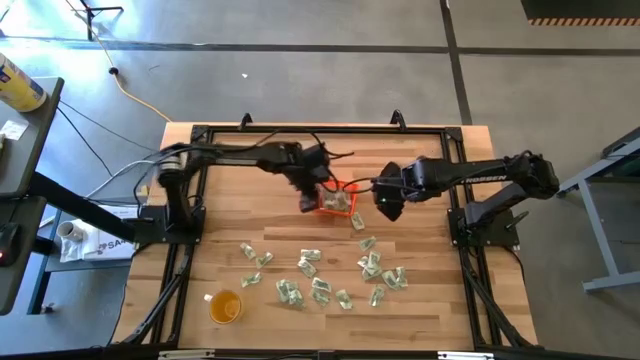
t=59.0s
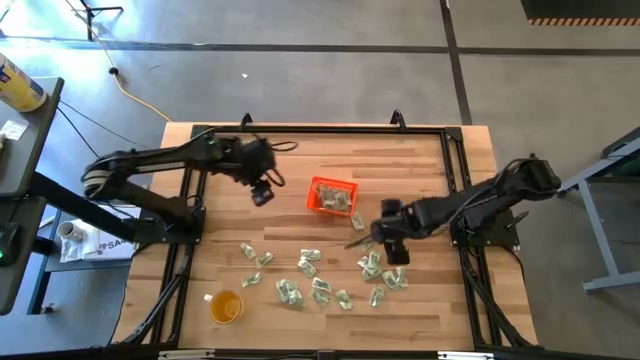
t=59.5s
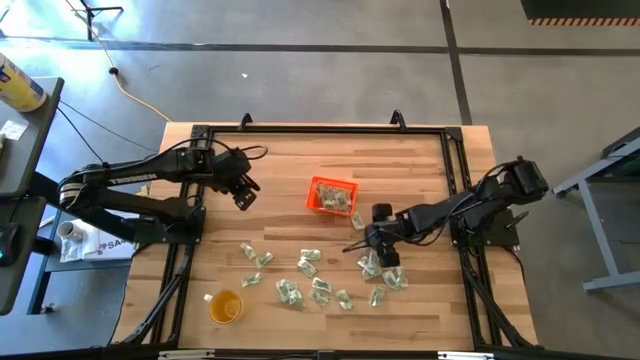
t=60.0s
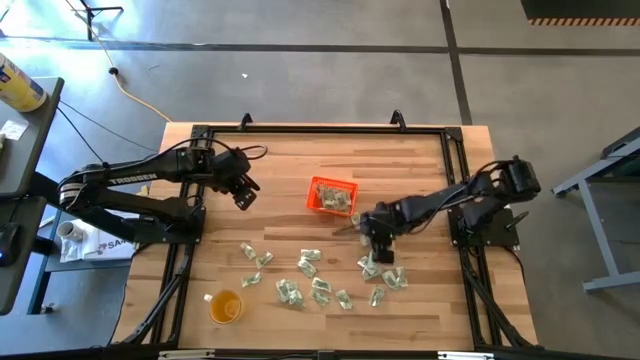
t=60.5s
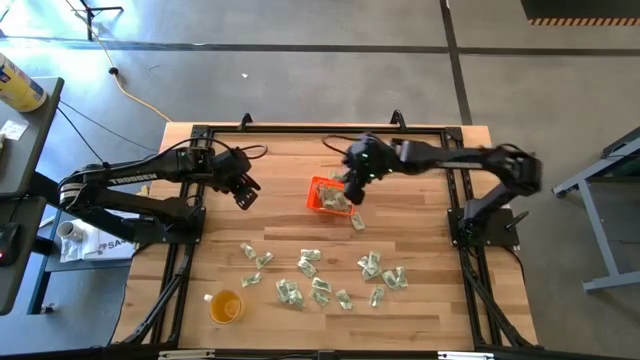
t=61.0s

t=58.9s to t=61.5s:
Task: Pick and place Stevia / Truvia into bins
Put the stevia packet into the basket

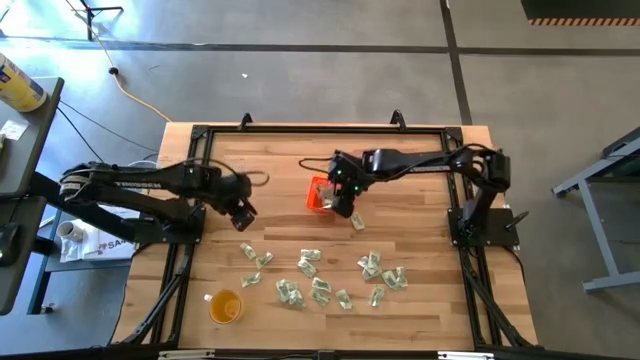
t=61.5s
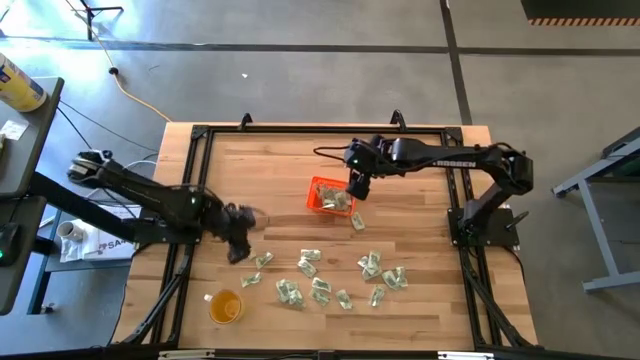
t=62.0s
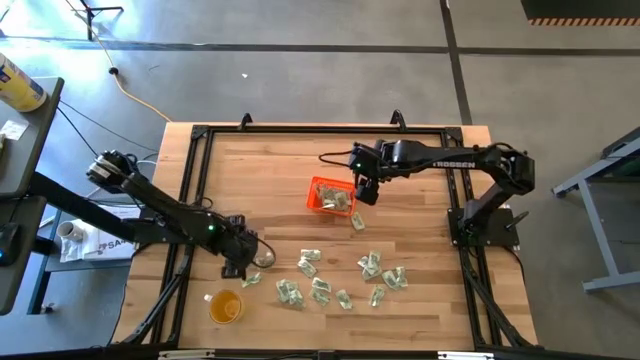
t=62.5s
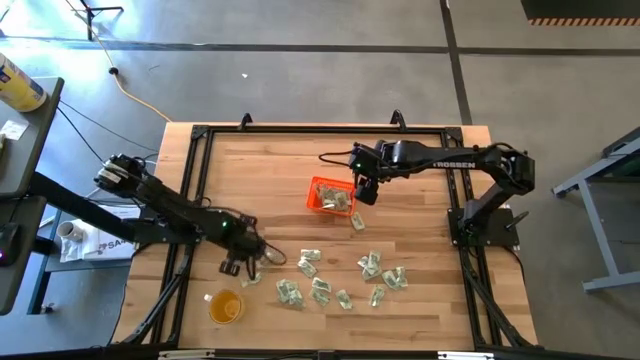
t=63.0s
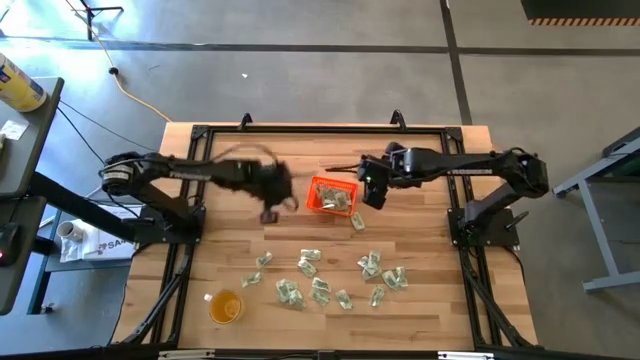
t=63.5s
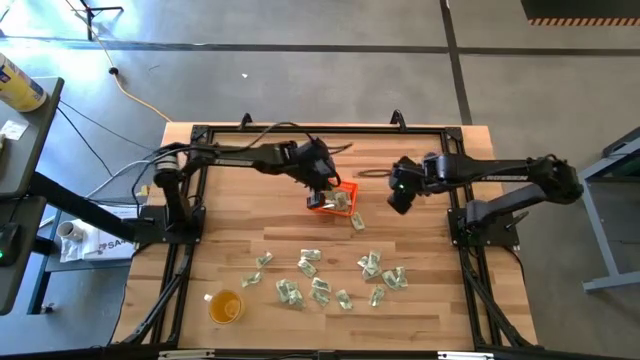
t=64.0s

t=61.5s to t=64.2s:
Put the stevia packet into the basket

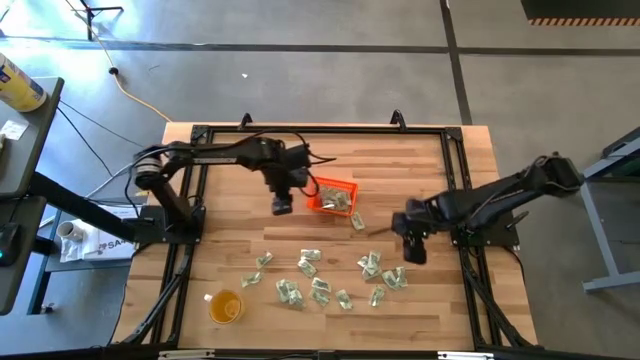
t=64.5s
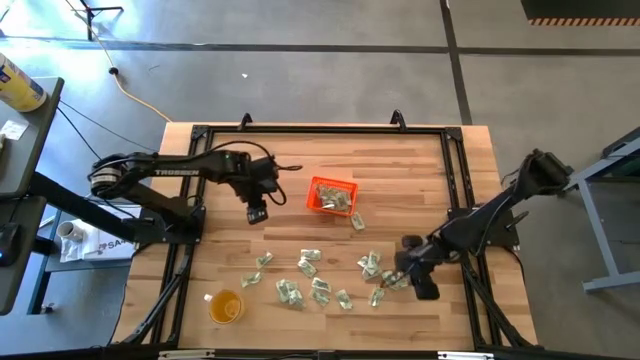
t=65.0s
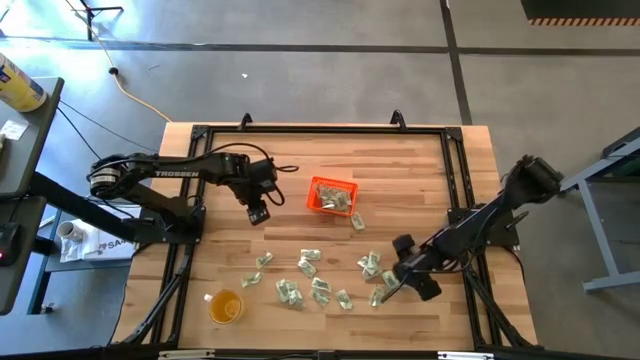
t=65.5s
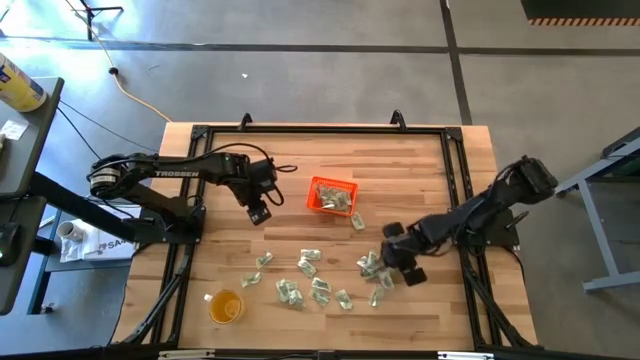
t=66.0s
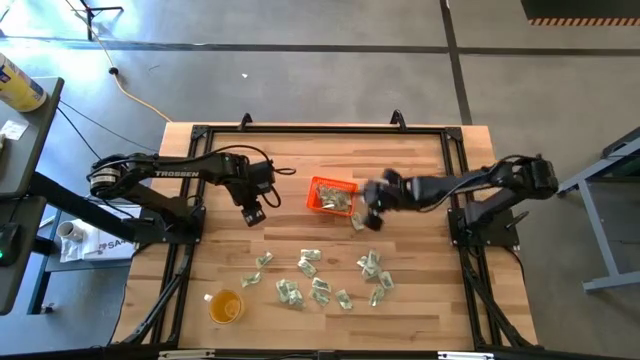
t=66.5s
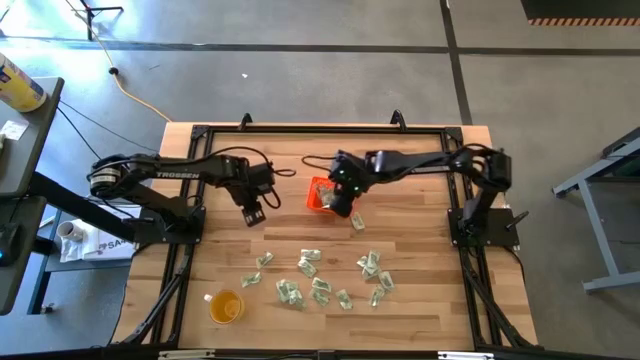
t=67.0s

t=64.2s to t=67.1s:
Put the stevia packet into the basket

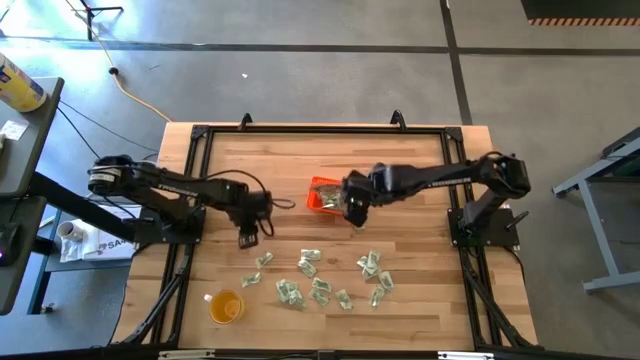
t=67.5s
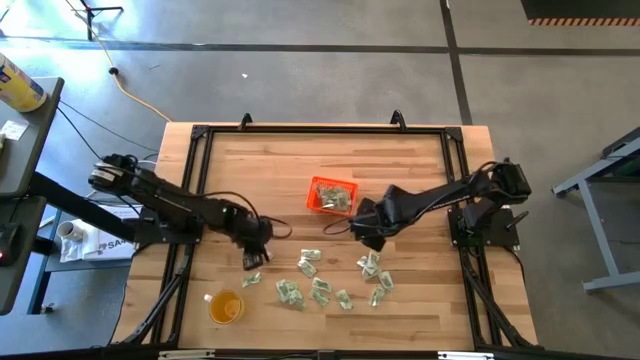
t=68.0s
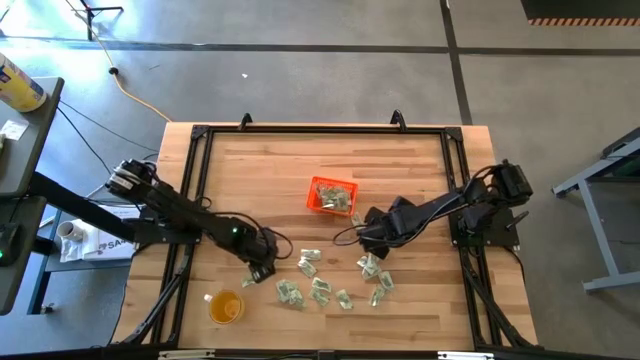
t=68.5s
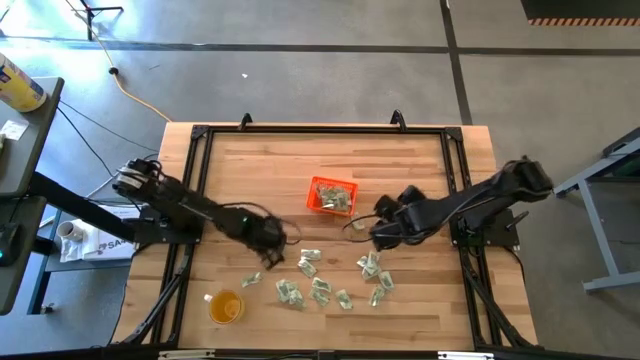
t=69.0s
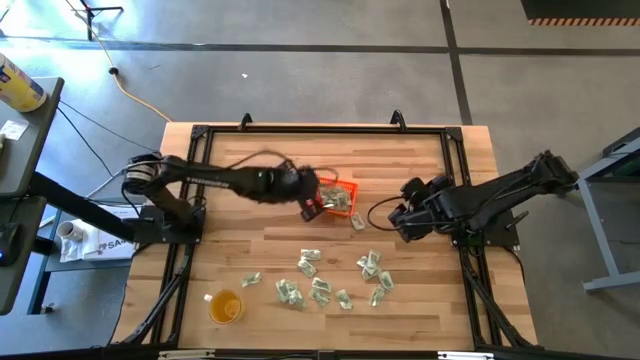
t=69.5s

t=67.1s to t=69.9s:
Put the stevia packet into the basket

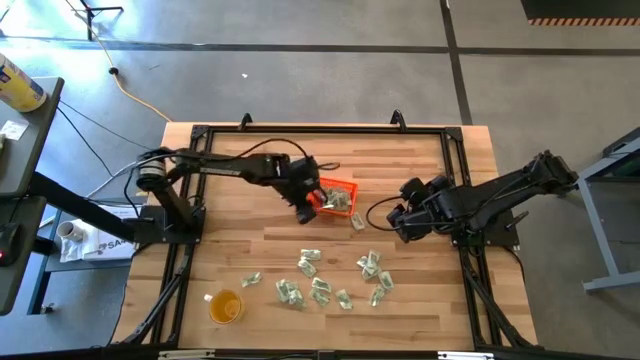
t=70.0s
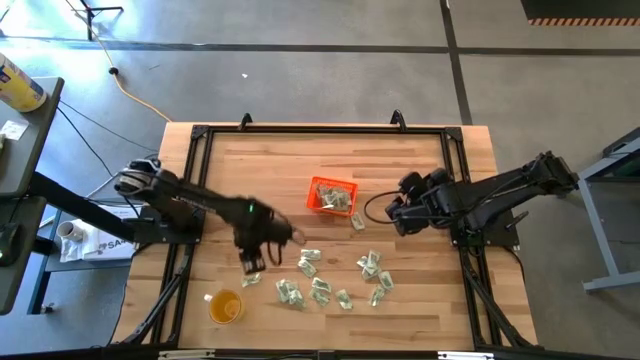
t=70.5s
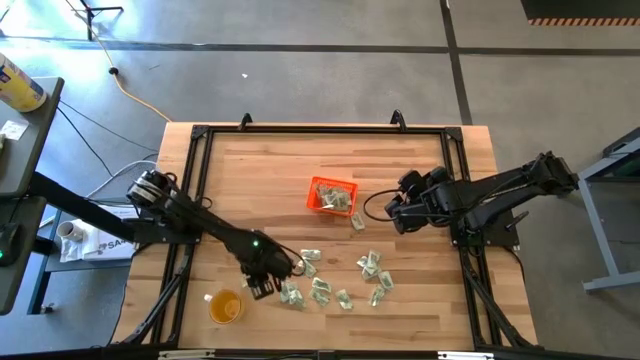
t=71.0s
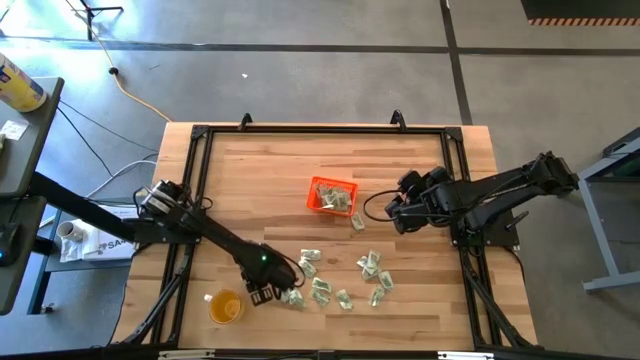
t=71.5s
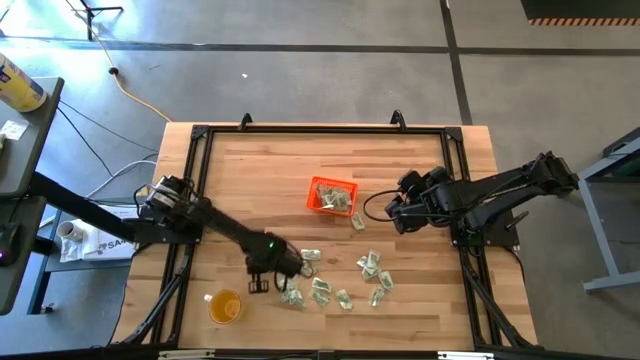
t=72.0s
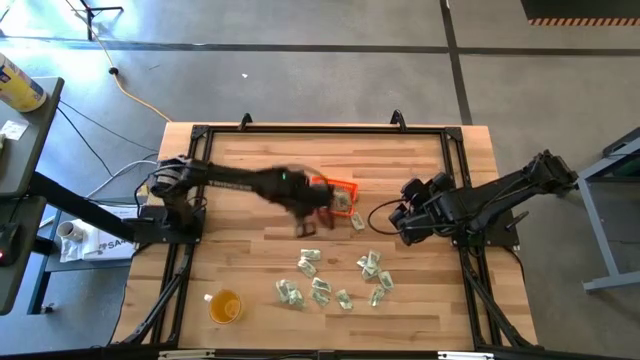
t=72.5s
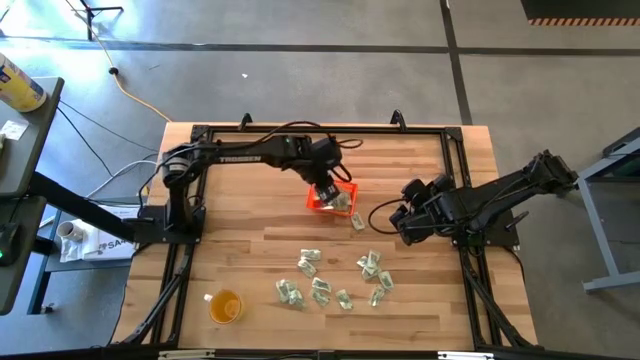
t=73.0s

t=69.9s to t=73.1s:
Put the stevia packet into the basket

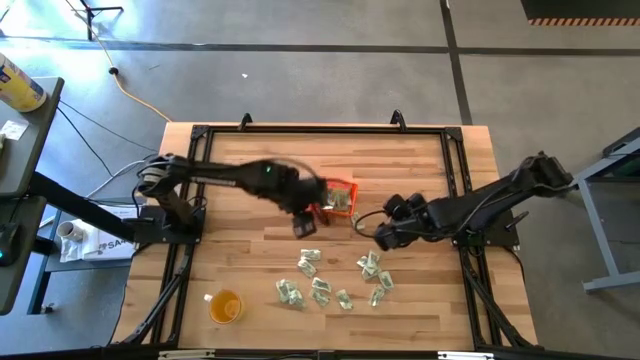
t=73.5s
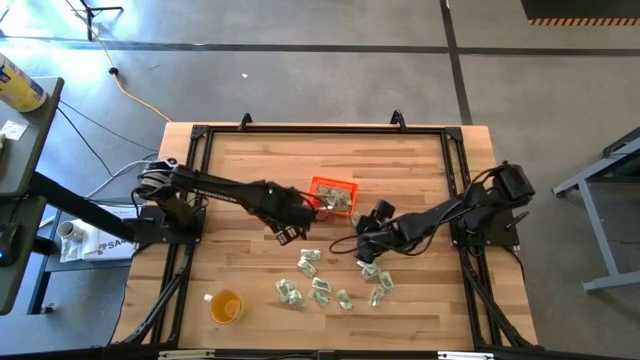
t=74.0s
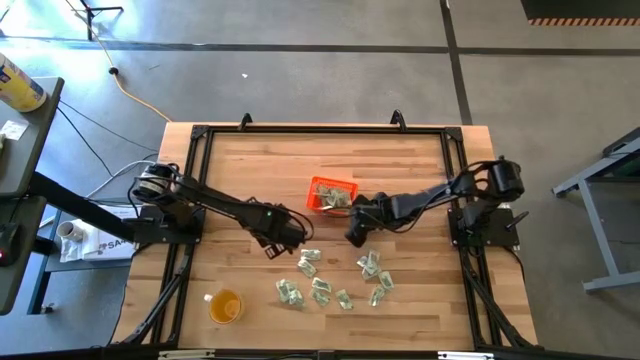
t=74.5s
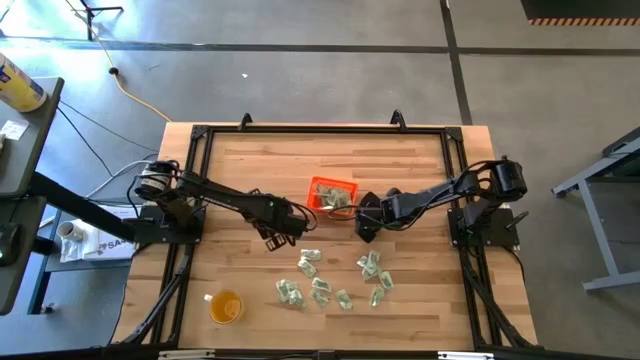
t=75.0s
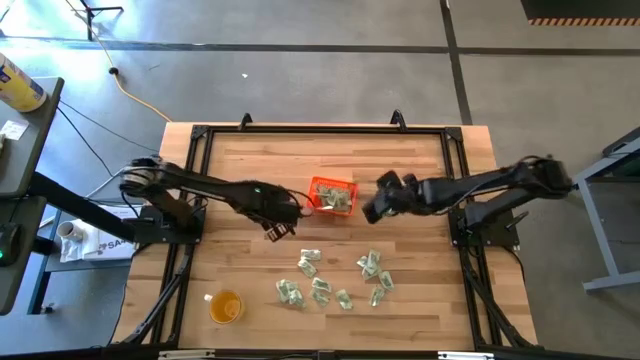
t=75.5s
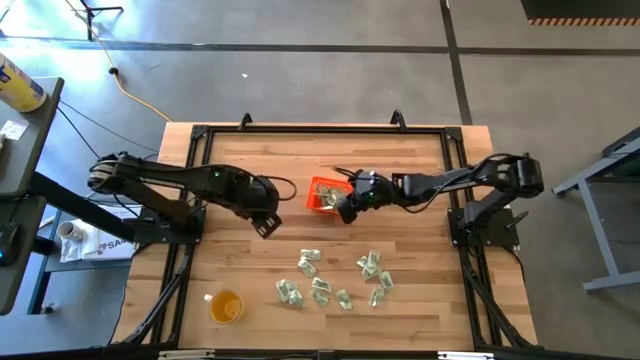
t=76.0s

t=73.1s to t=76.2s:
Put the stevia packet into the basket

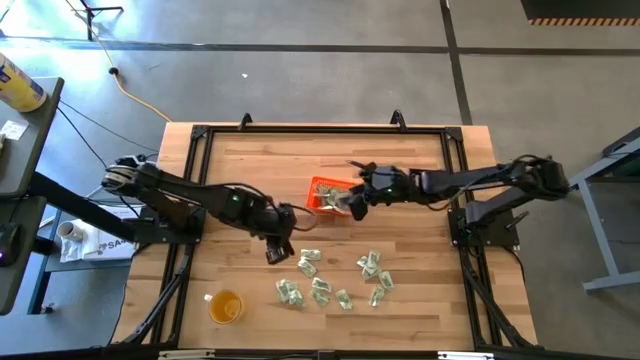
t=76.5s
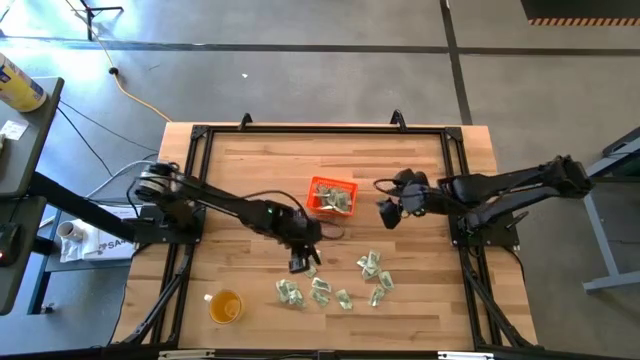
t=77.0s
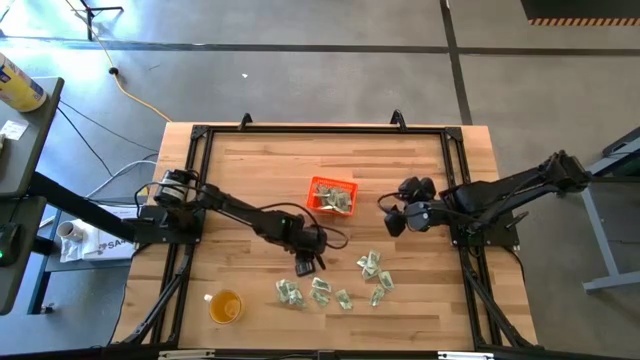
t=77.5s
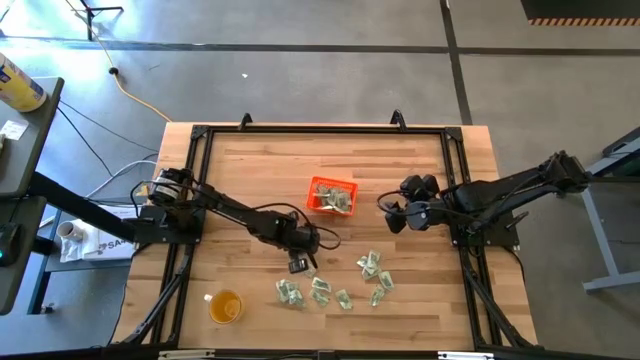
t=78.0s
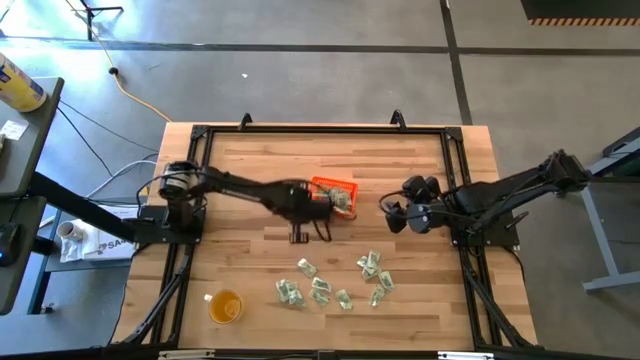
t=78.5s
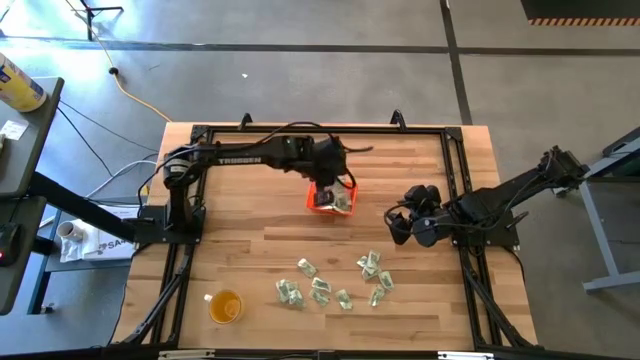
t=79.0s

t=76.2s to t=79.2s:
Put the stevia packet into the basket

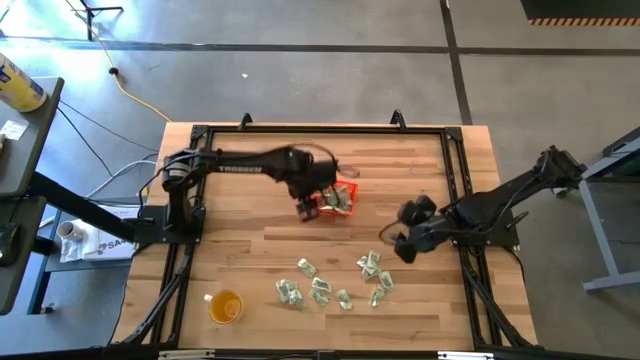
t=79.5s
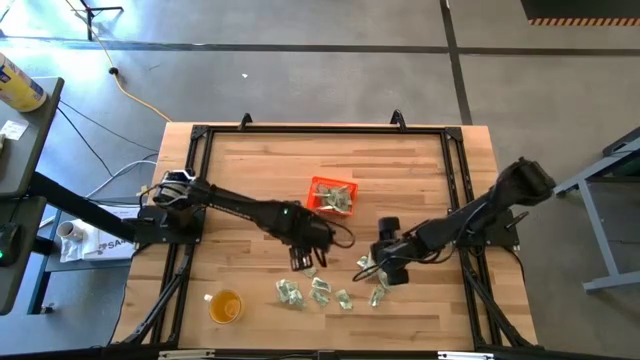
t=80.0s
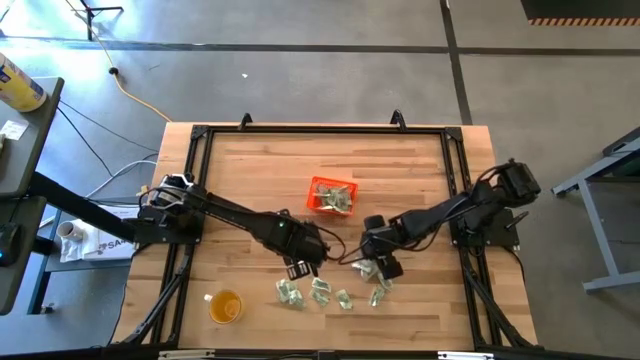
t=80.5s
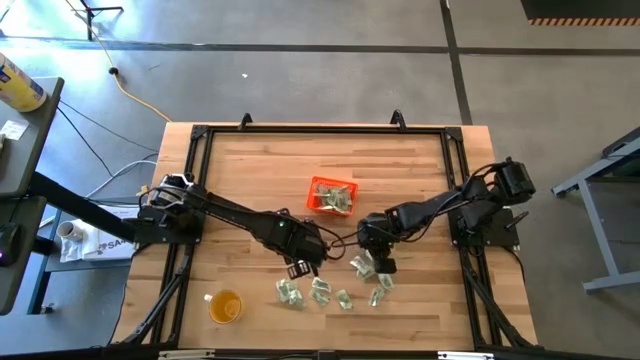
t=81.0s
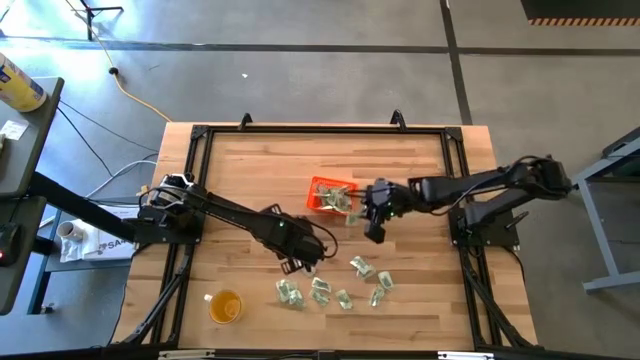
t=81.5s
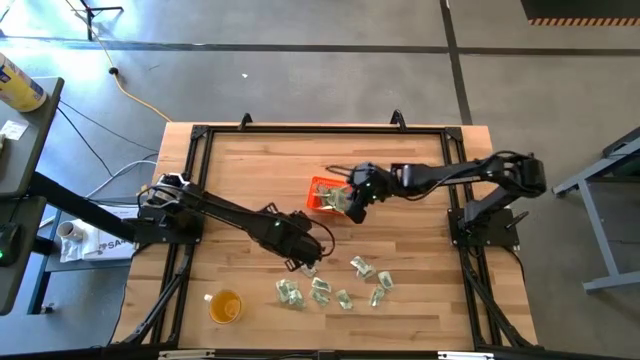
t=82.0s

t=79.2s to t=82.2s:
Put the stevia packet into the basket
